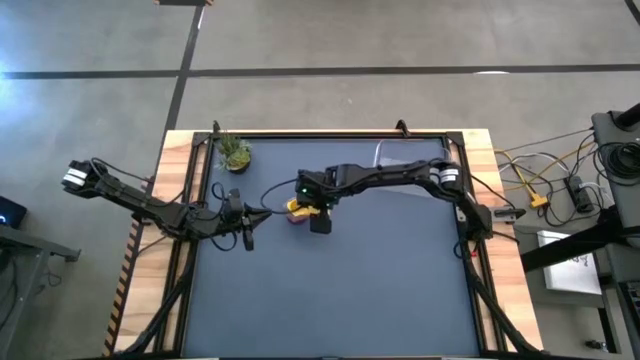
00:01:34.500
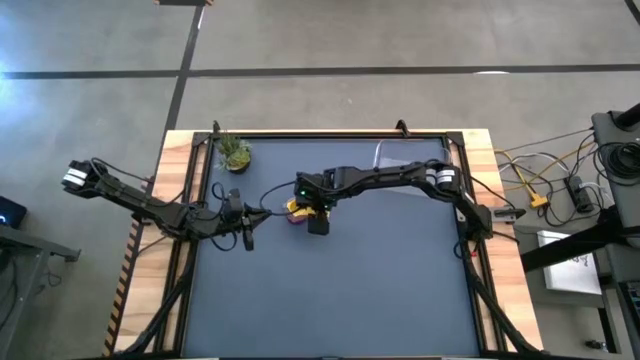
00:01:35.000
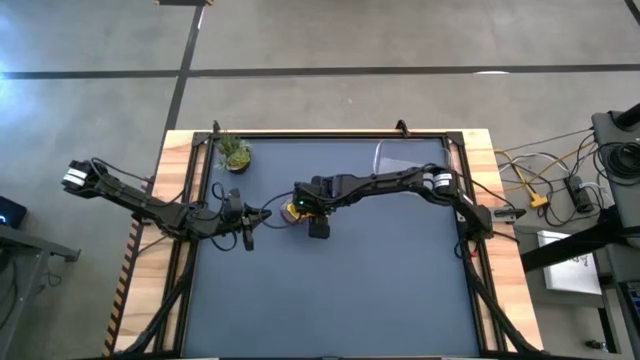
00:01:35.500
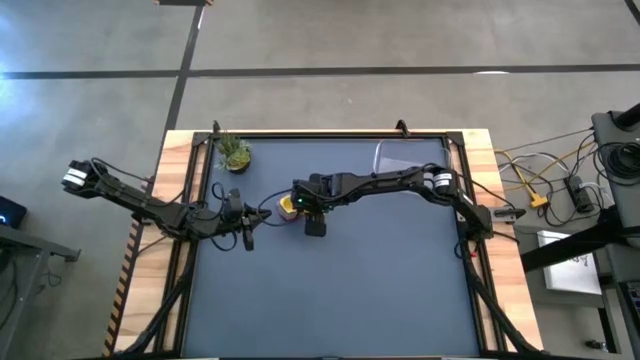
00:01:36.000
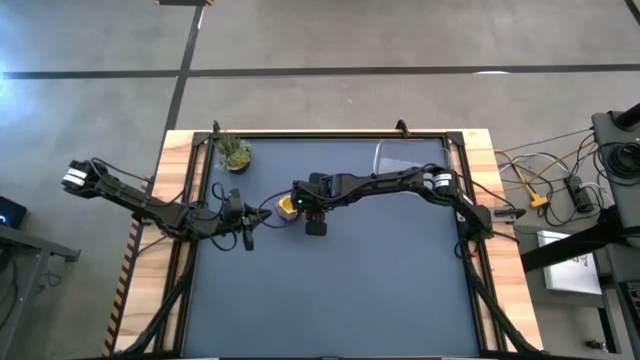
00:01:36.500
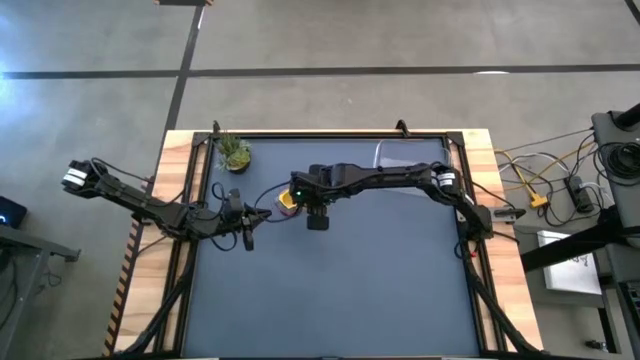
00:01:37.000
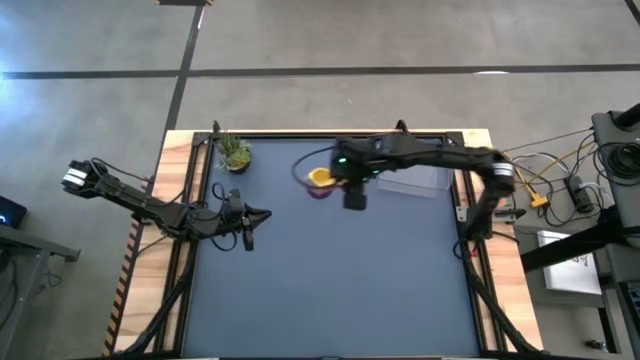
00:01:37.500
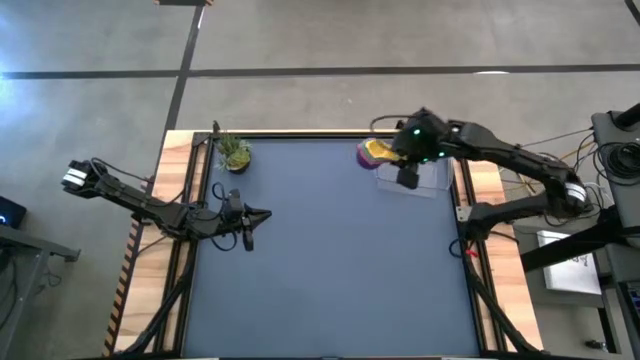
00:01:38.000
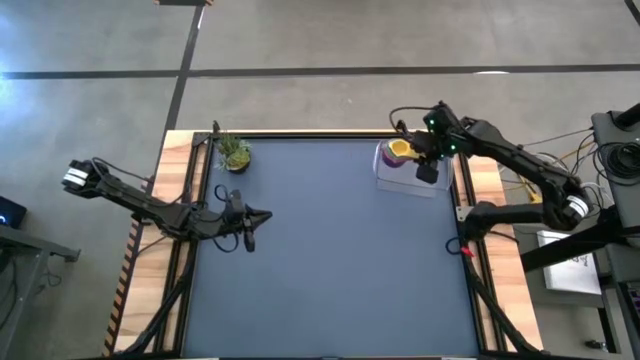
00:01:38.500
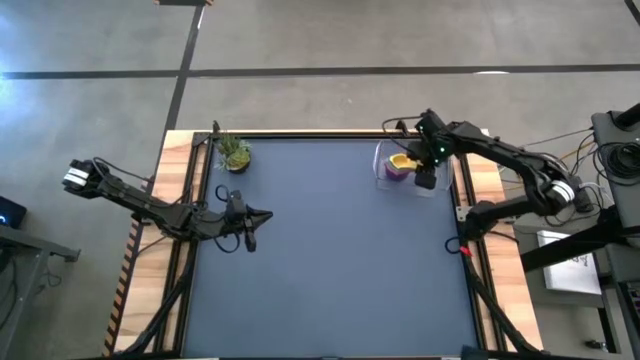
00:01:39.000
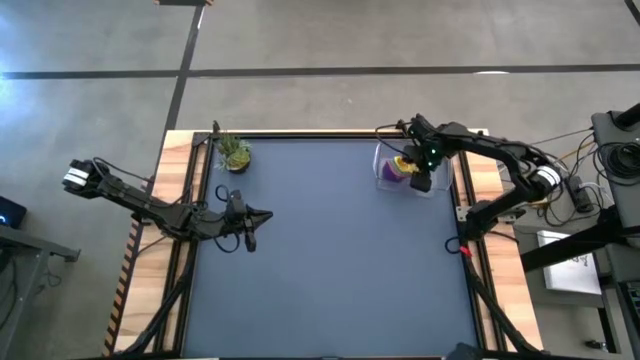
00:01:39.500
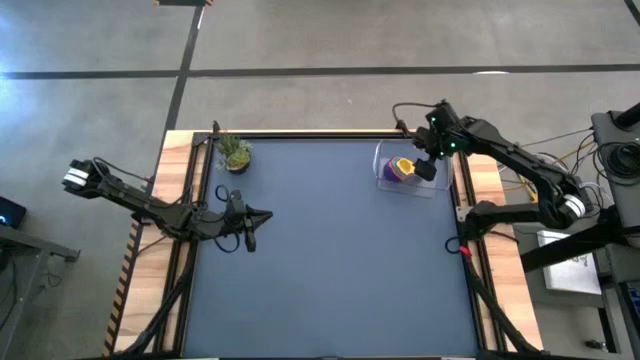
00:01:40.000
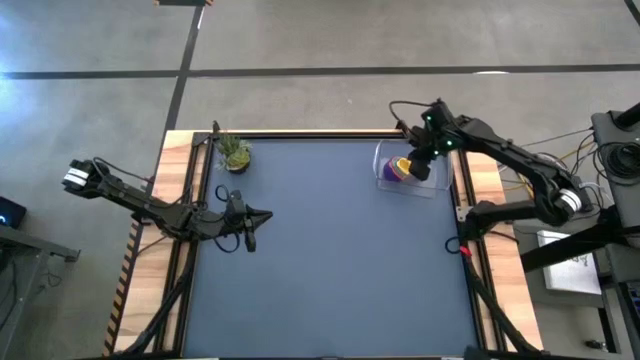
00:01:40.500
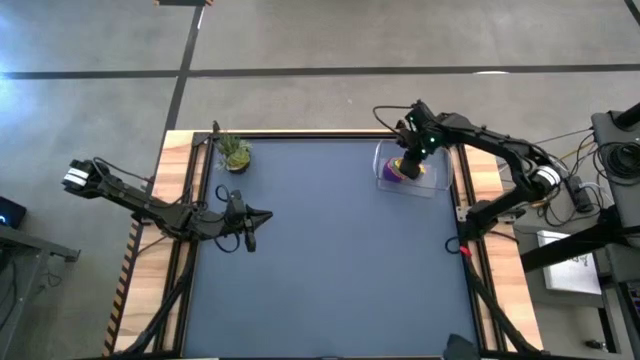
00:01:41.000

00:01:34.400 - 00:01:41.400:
Task: Nest measuring cups in basket
Put the nested measuring cups inside the transparent bin

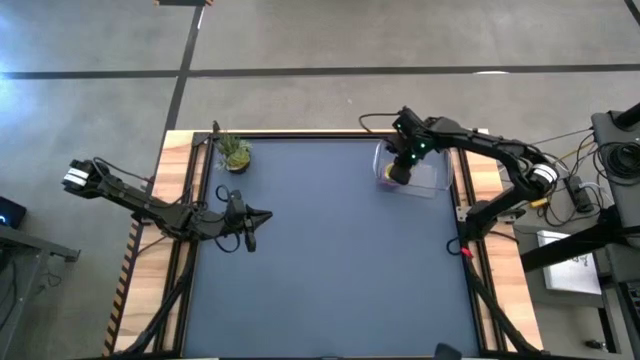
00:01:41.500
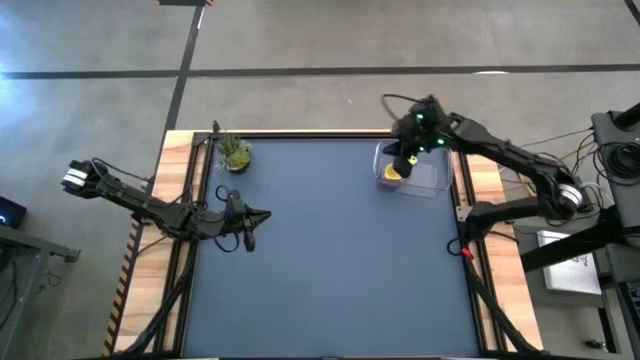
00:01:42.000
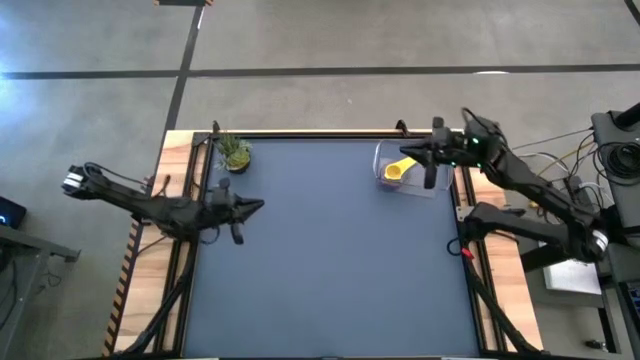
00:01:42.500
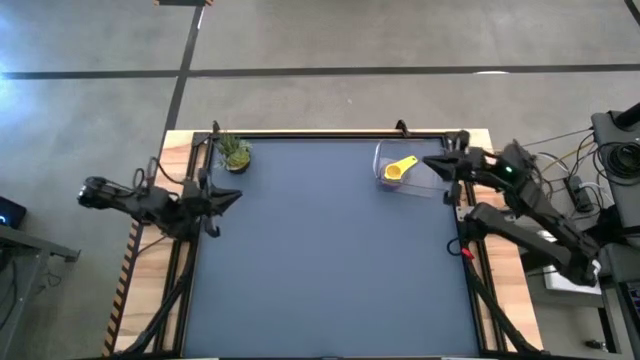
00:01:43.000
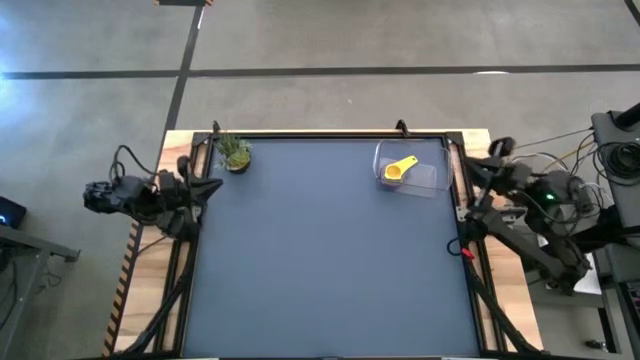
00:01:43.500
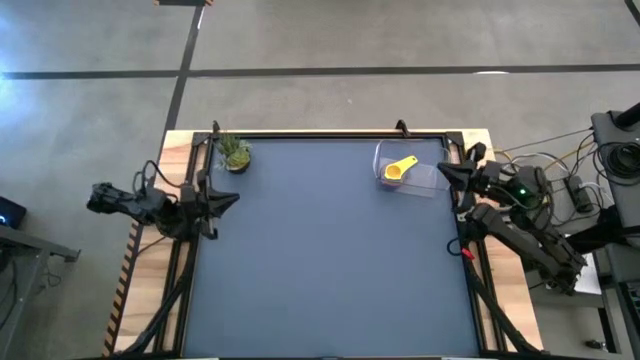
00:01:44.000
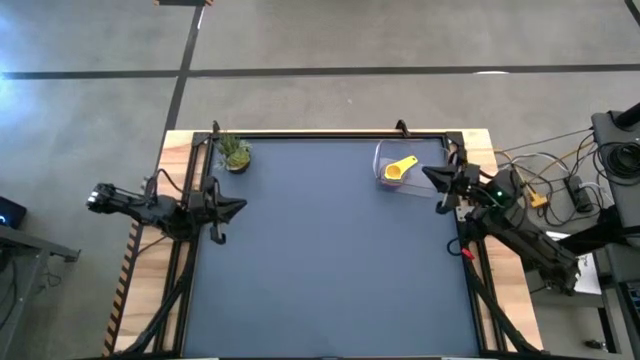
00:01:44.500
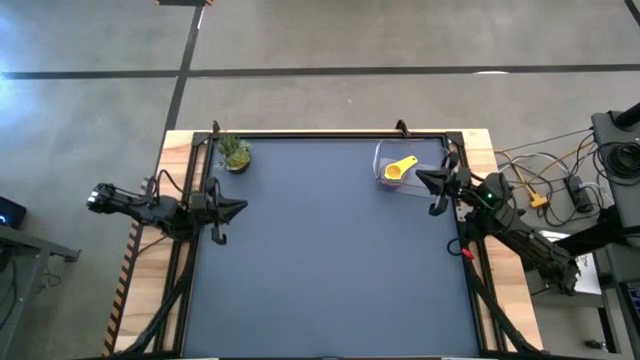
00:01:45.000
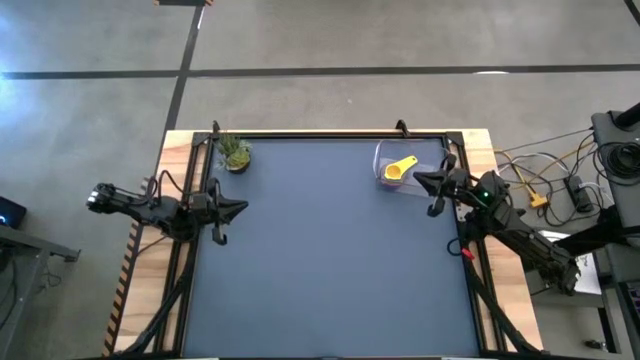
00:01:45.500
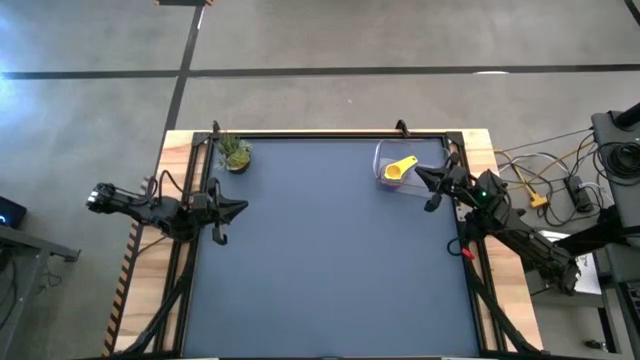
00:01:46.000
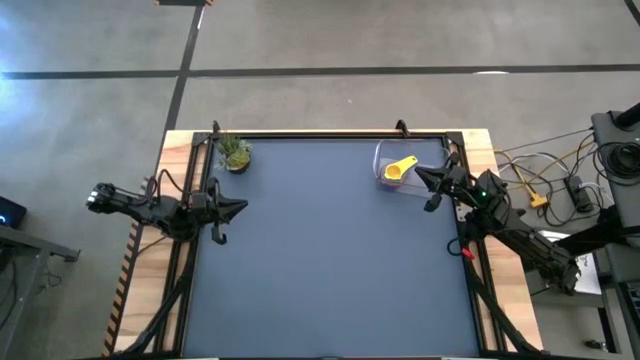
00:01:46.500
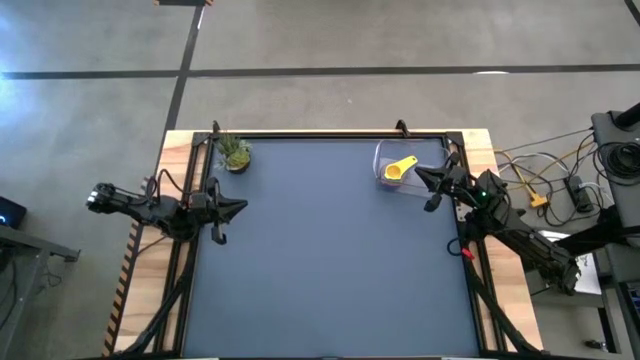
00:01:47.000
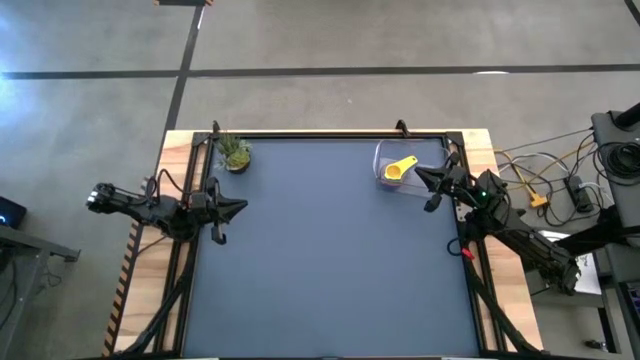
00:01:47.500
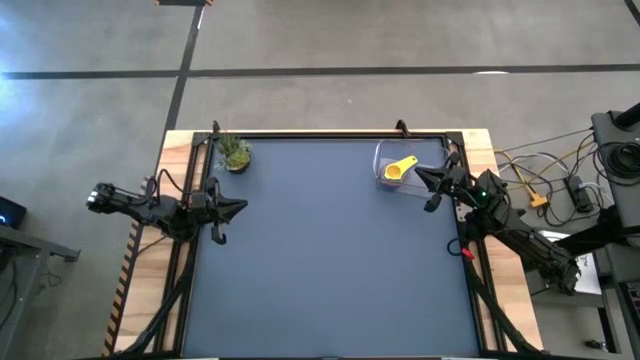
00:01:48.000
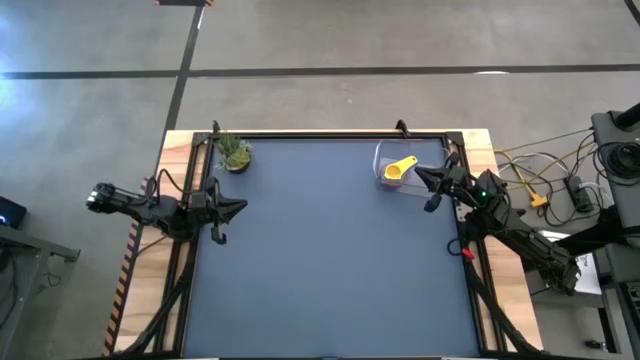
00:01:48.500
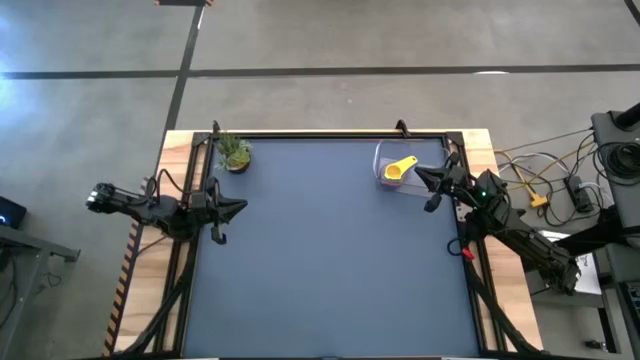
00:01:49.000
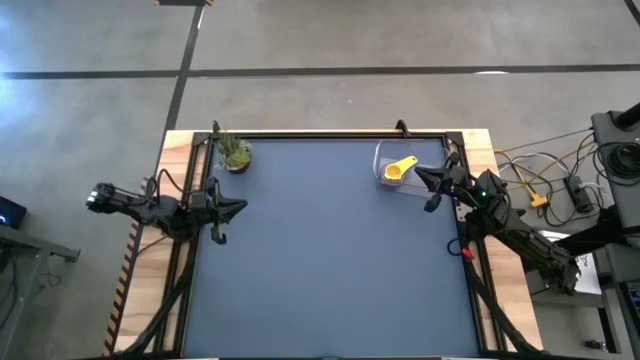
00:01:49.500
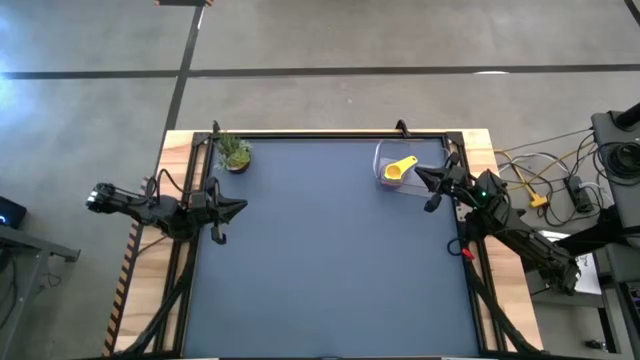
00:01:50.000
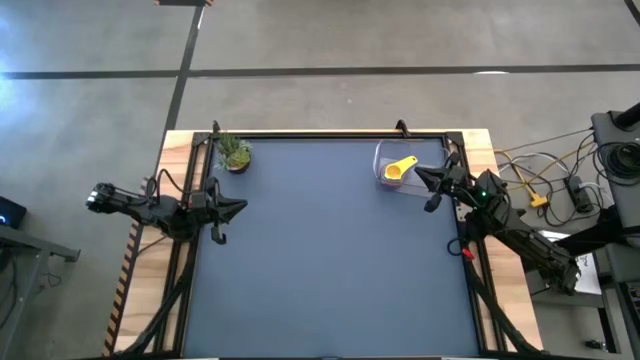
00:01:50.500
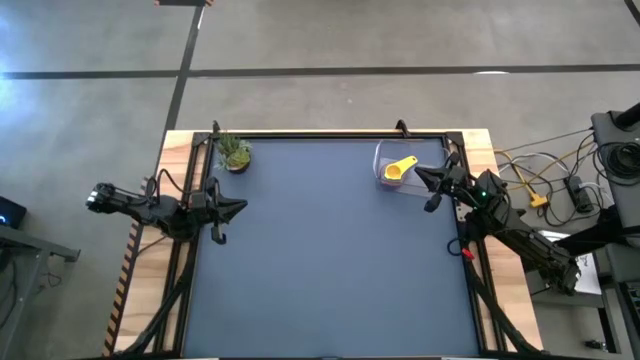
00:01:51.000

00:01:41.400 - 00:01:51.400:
Return to Home Position

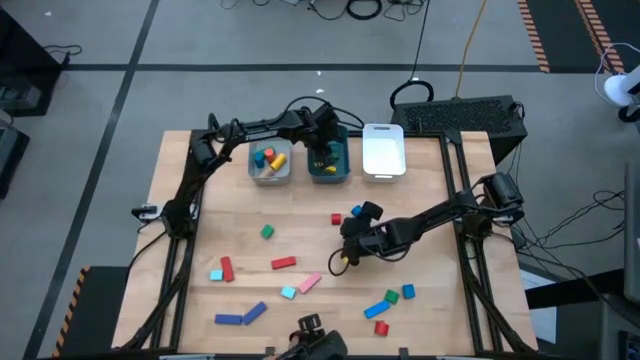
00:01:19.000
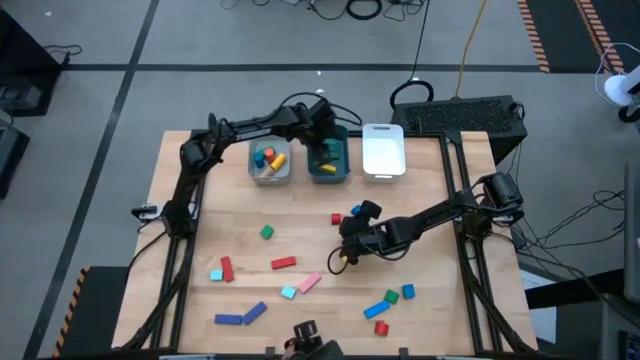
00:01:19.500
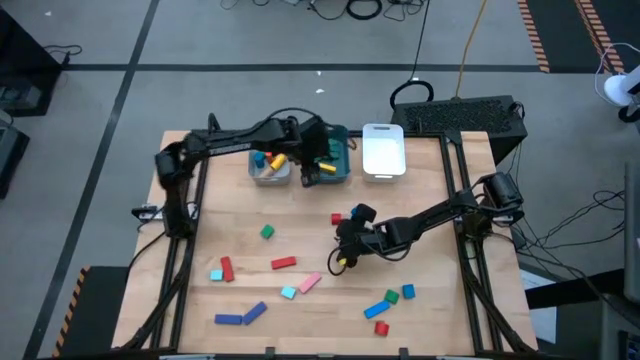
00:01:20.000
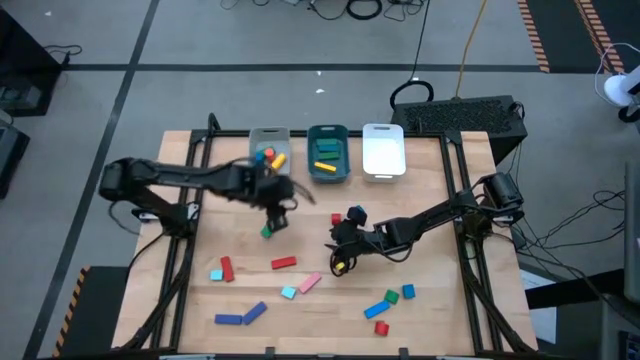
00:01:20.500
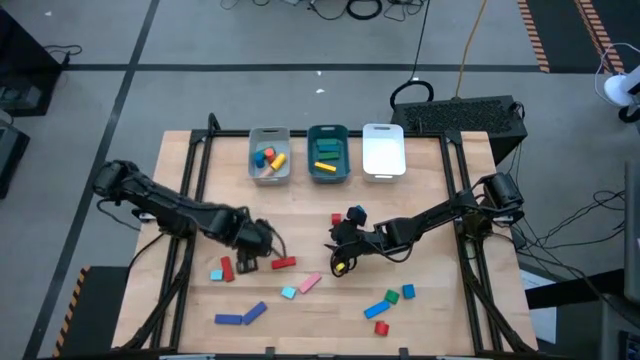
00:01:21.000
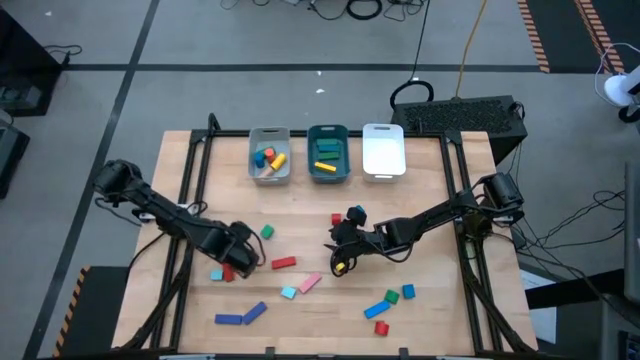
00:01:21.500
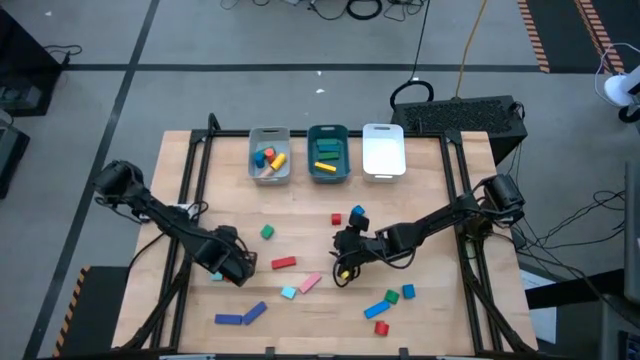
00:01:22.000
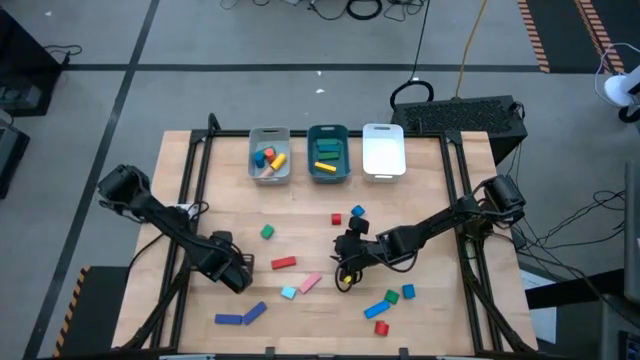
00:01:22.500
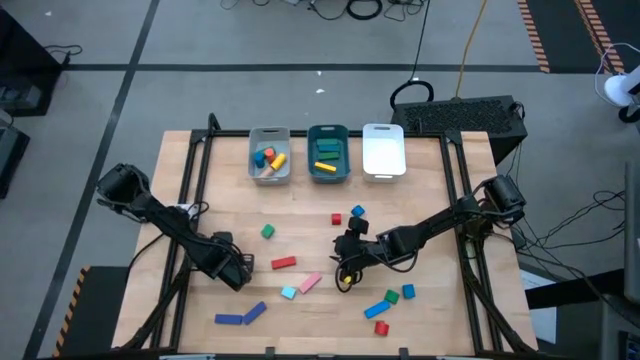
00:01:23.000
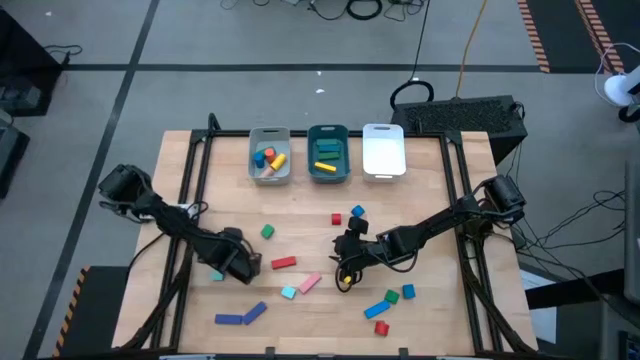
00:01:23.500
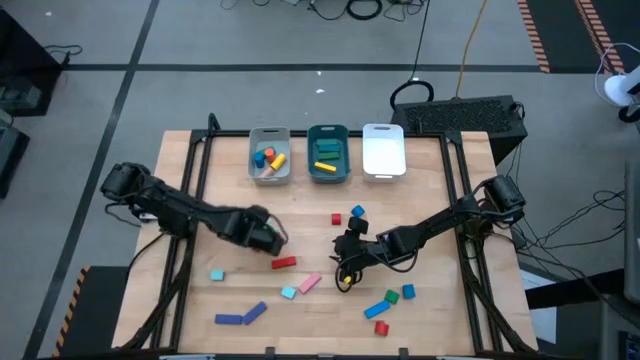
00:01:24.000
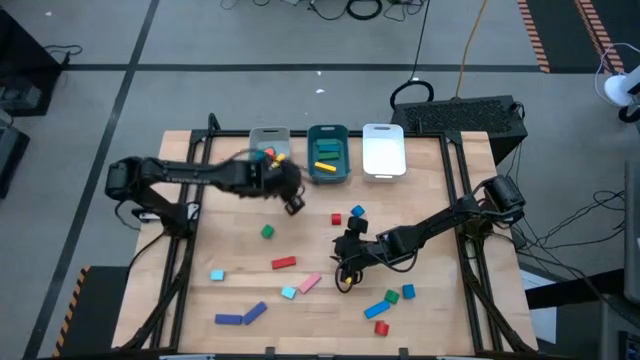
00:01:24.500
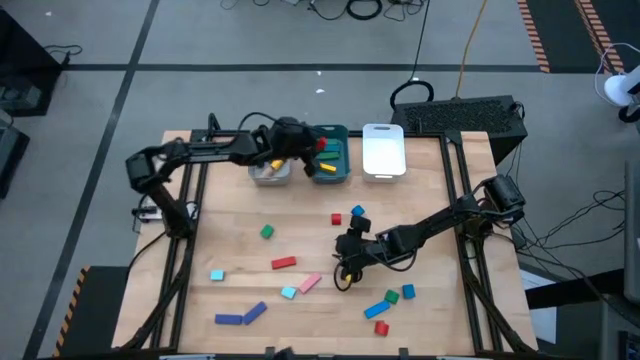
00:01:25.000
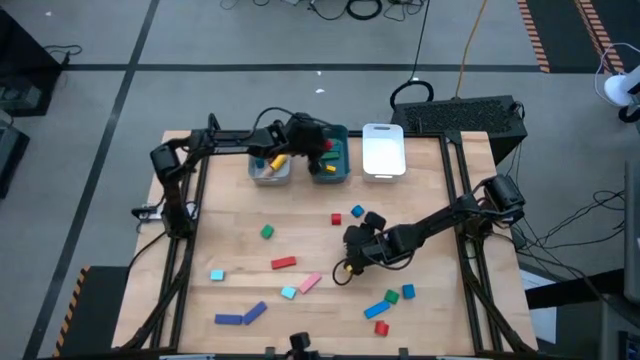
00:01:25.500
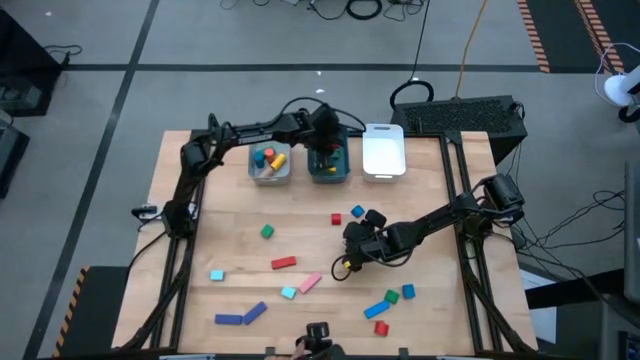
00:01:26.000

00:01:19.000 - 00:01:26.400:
Task: Sort blocks by size
Put the left red rectangle block into the blue bin
